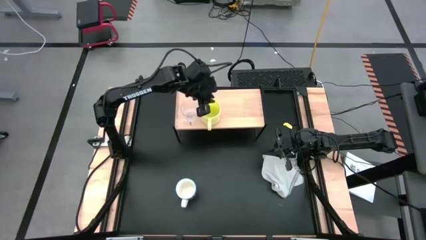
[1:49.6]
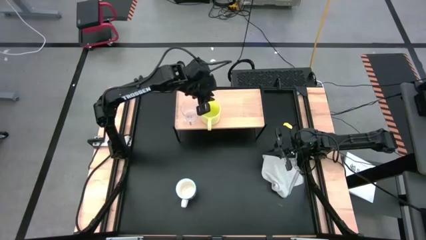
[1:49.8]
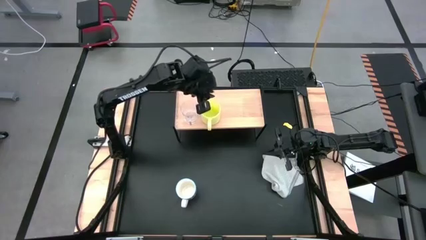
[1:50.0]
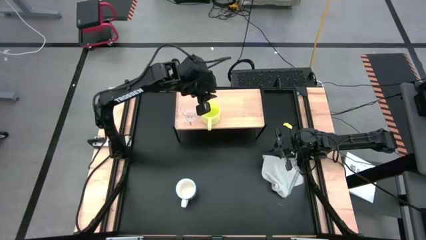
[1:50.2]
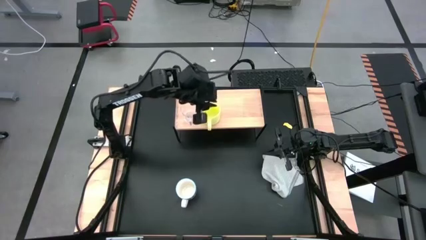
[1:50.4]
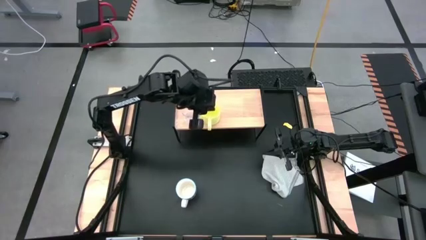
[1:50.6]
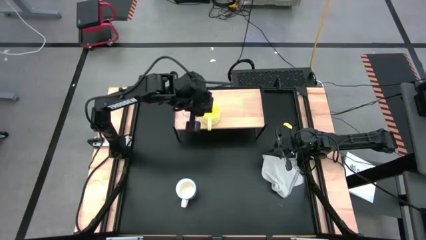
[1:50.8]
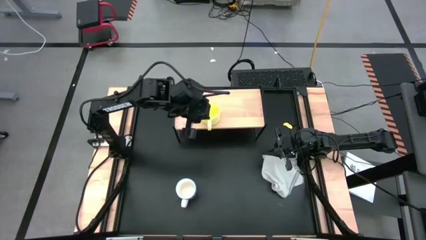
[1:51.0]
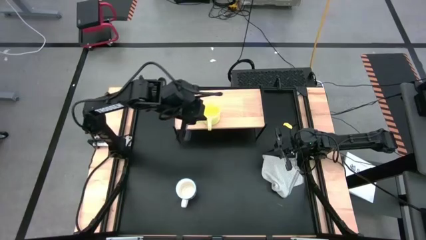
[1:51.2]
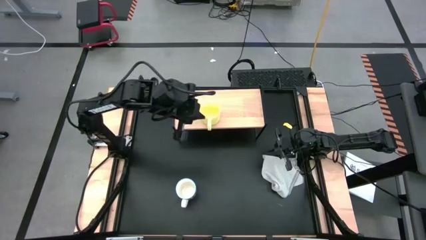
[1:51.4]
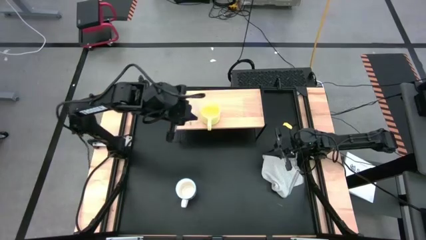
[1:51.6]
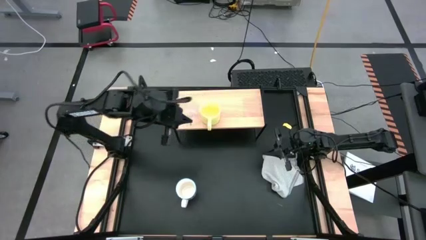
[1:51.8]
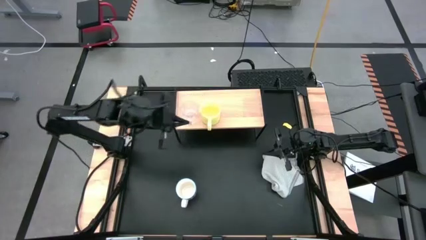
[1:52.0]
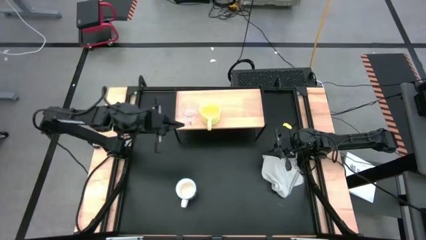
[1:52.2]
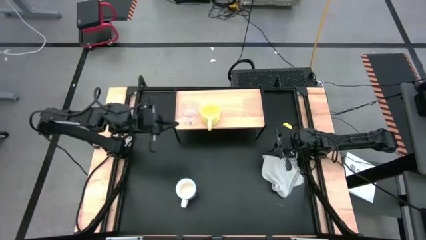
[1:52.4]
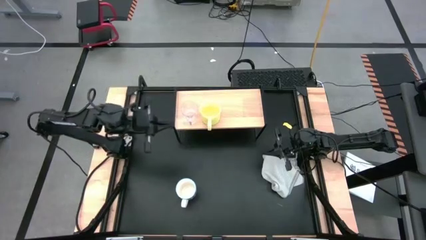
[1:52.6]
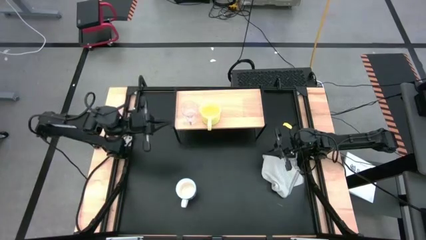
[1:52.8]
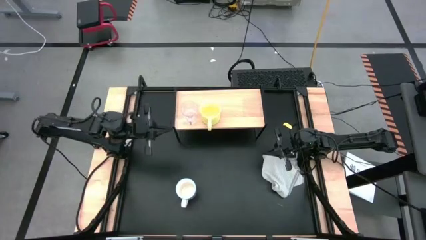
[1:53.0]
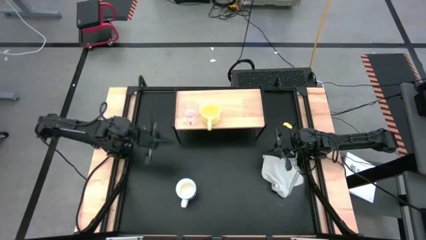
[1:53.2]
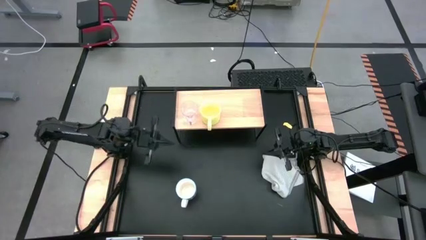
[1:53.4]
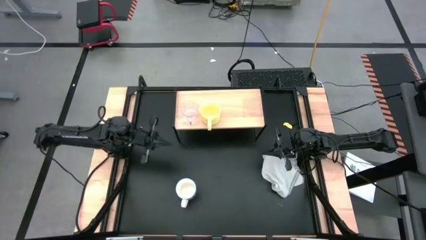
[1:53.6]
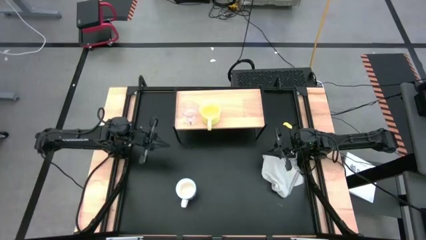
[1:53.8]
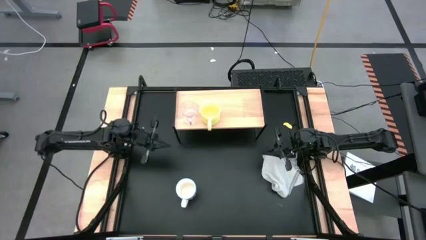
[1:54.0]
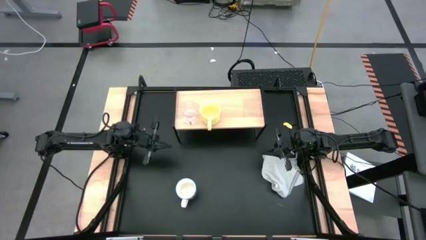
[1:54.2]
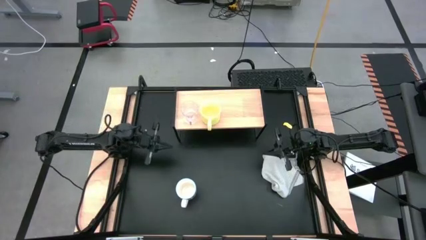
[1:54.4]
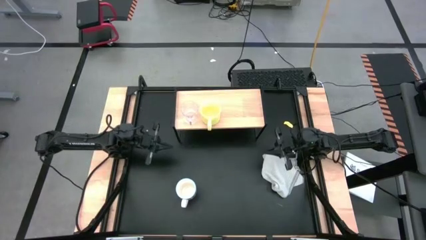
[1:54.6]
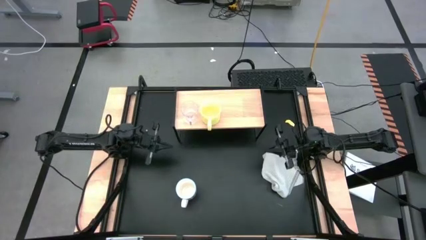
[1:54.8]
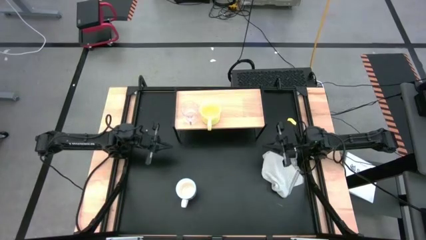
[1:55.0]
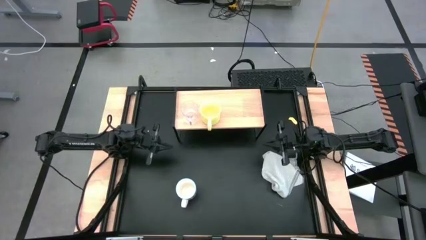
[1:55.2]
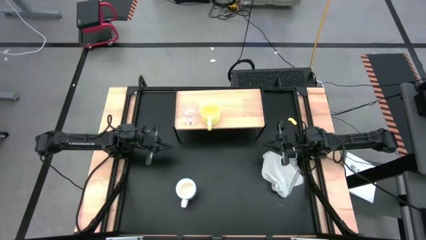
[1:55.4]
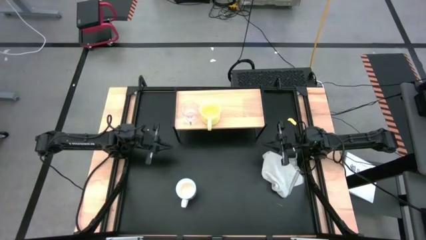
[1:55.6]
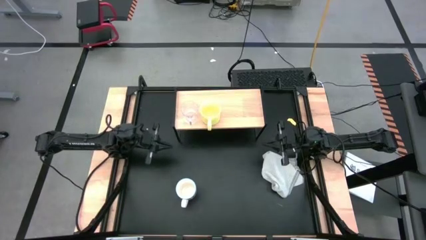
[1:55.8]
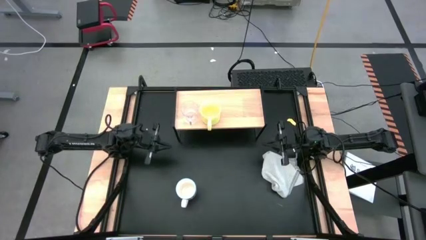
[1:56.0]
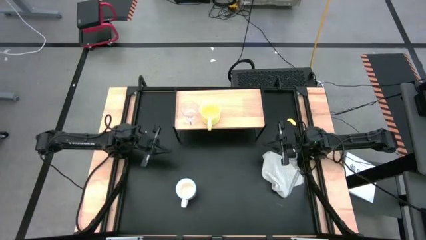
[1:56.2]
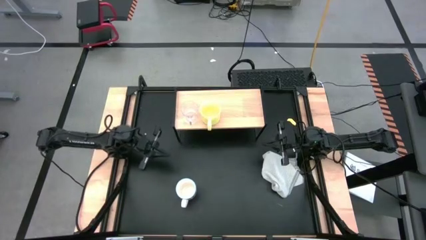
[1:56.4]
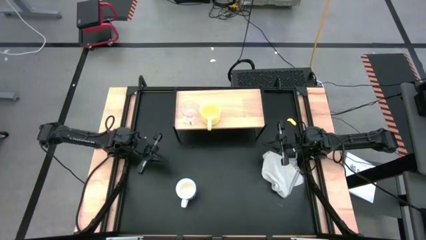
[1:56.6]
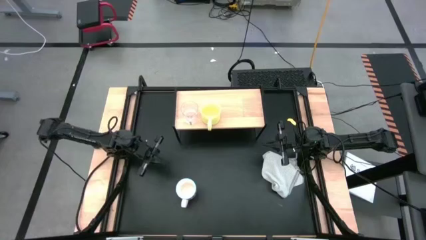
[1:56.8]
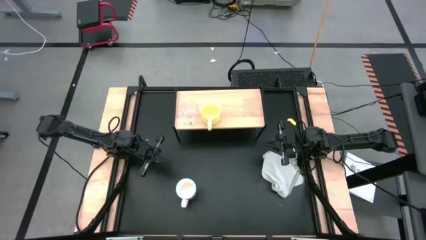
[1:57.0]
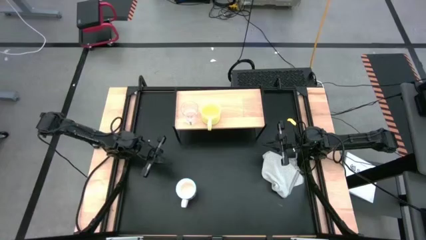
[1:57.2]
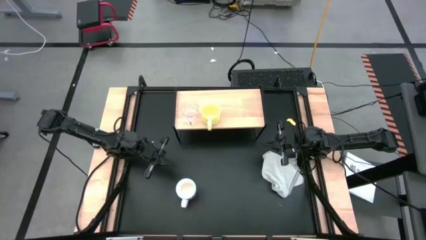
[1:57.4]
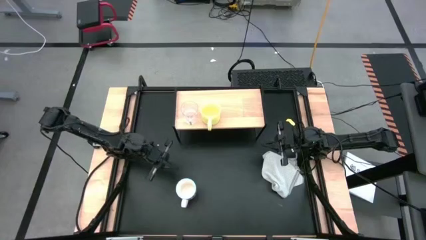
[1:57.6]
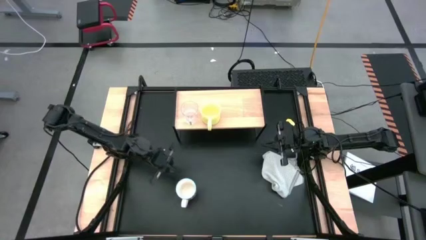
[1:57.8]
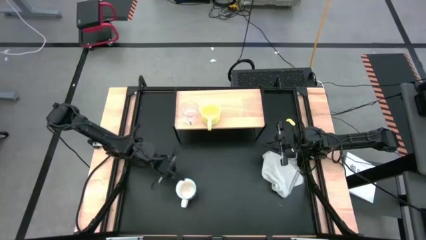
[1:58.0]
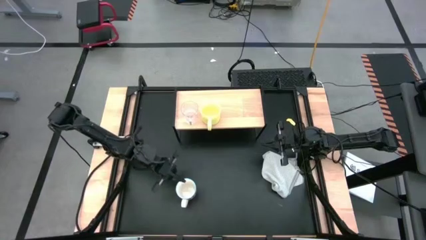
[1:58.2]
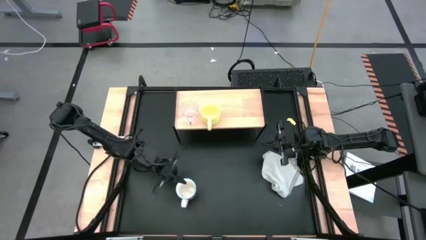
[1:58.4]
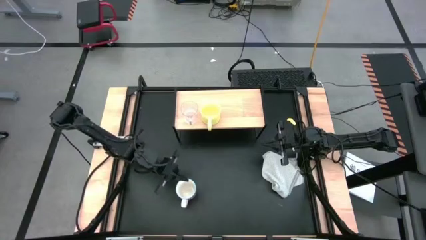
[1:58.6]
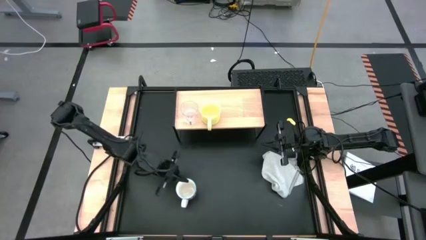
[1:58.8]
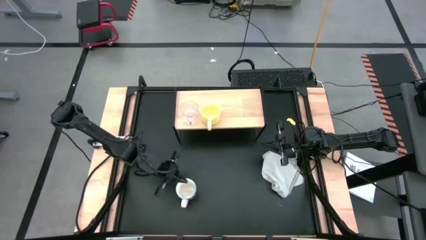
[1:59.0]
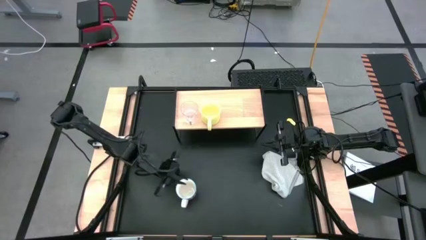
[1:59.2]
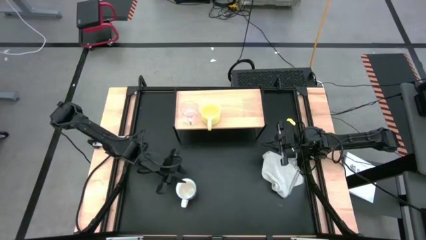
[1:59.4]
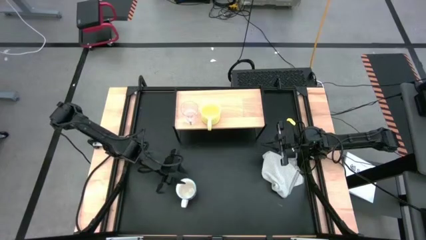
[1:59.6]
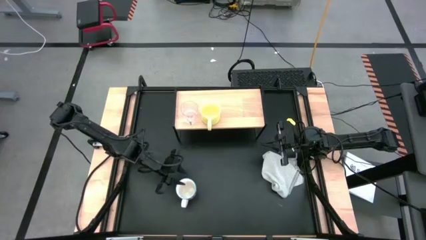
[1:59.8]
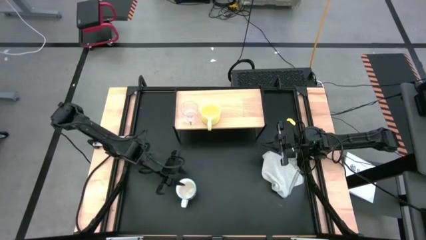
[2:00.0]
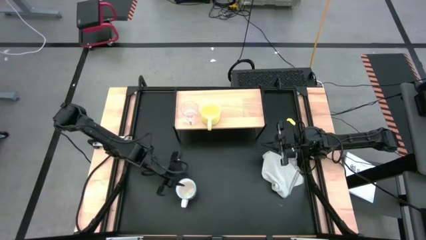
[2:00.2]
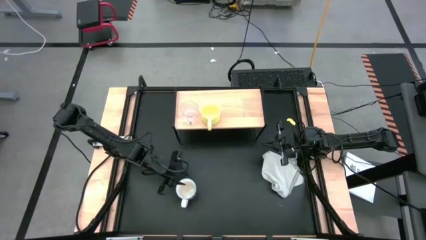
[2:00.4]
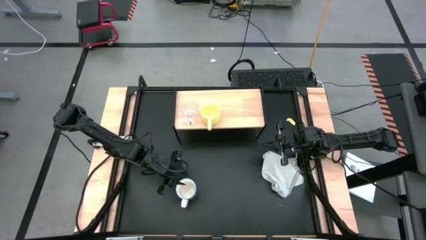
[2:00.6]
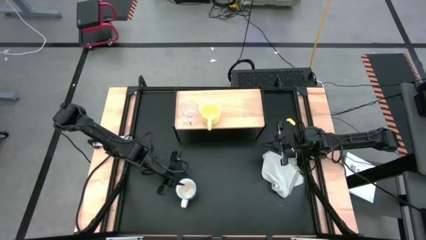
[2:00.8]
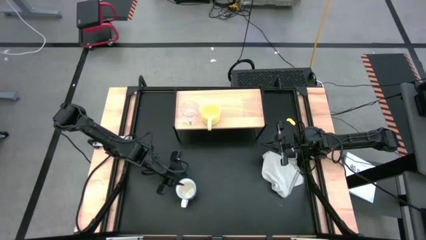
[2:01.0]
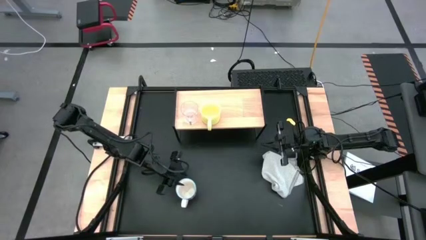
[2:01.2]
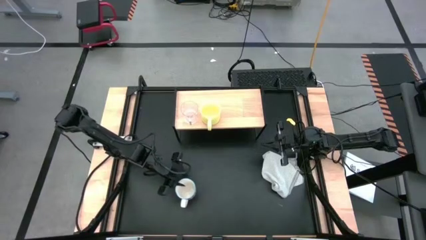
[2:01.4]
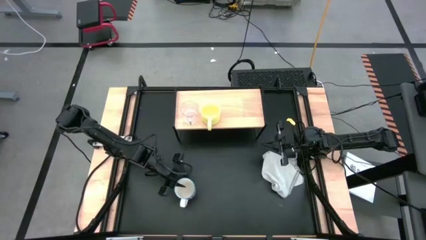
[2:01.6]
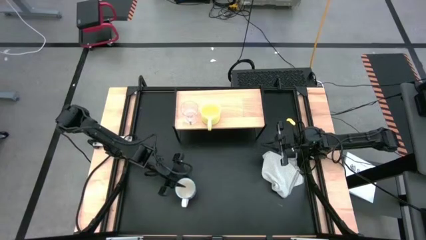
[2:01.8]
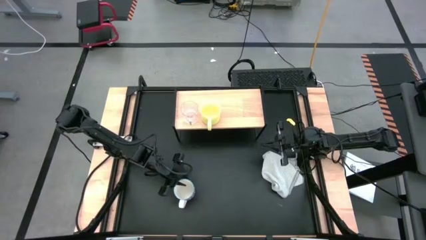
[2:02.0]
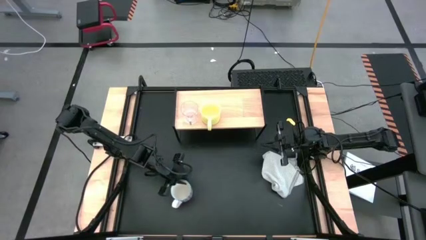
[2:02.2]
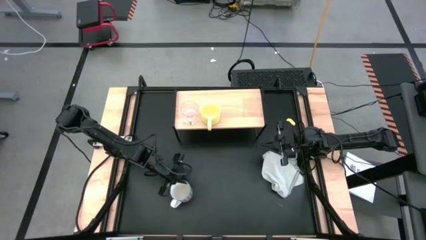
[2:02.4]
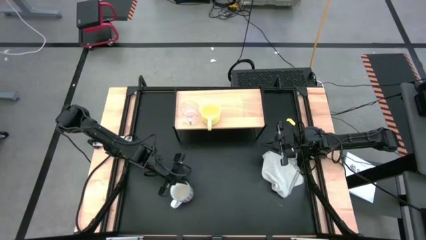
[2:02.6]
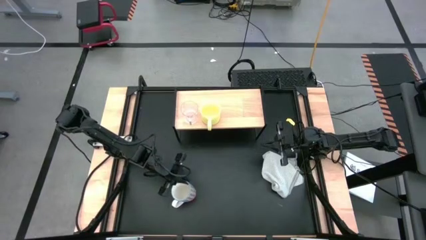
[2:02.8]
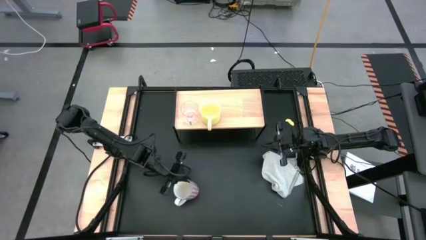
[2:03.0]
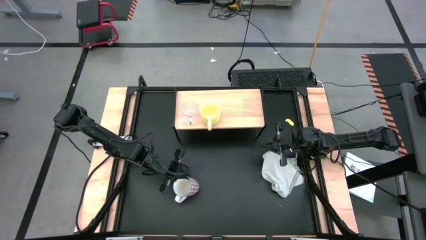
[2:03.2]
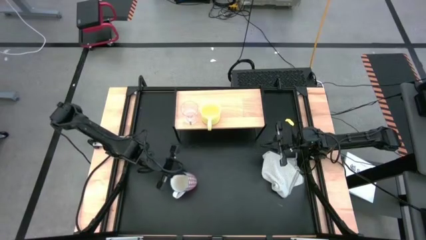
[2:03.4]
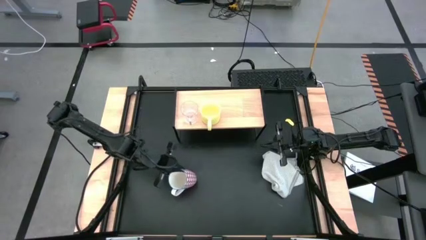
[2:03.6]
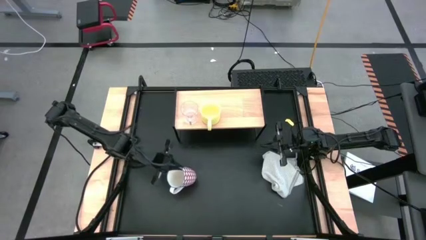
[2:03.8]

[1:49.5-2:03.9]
Task: Stack small to large cups/mugs on shelf
Put the red patterned mug on the shelf

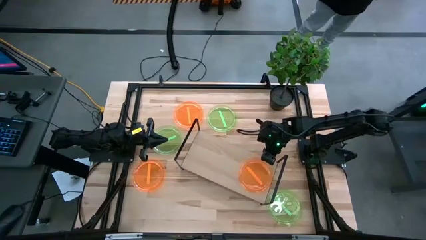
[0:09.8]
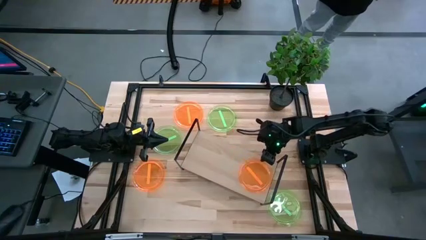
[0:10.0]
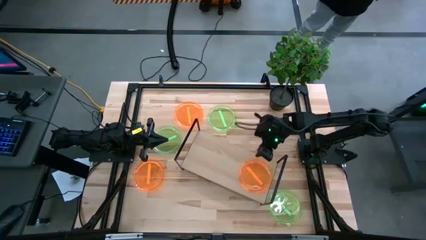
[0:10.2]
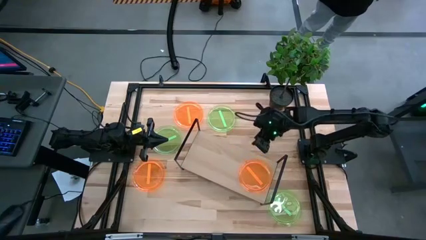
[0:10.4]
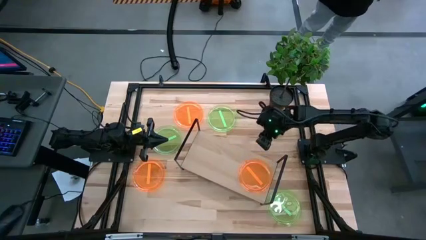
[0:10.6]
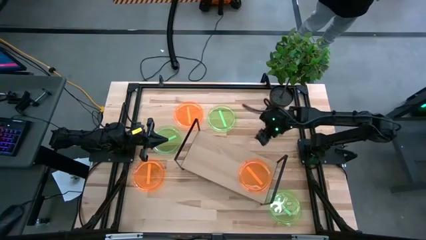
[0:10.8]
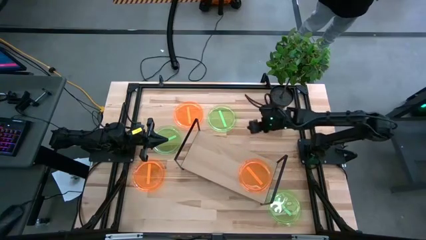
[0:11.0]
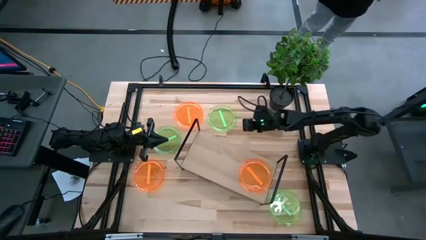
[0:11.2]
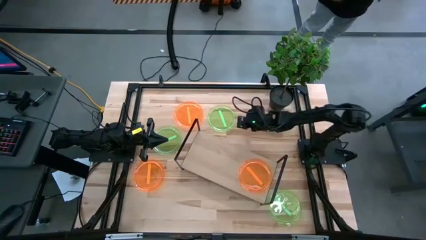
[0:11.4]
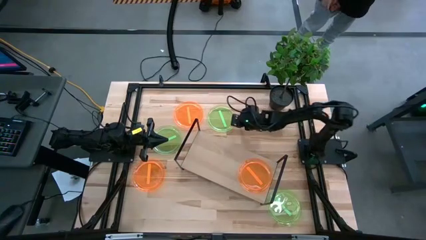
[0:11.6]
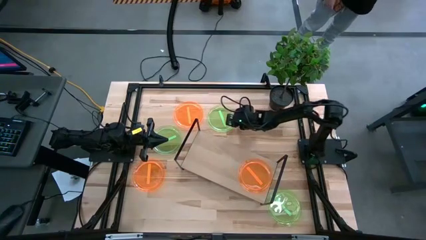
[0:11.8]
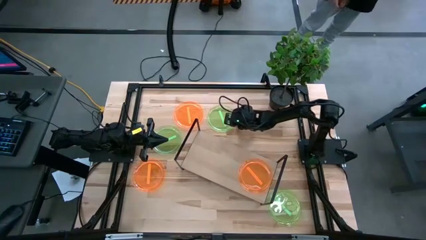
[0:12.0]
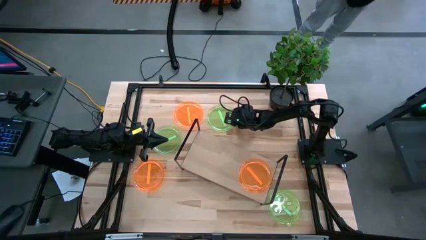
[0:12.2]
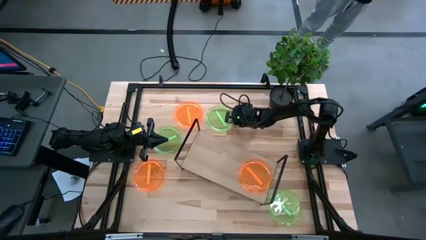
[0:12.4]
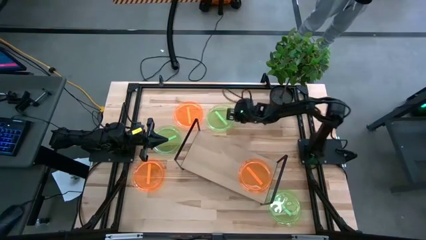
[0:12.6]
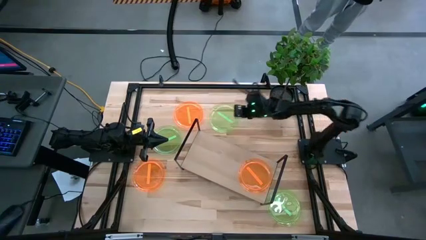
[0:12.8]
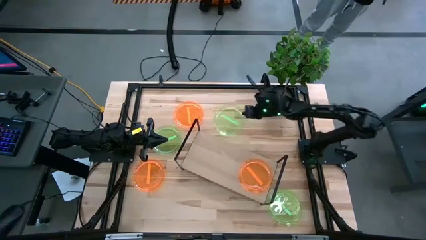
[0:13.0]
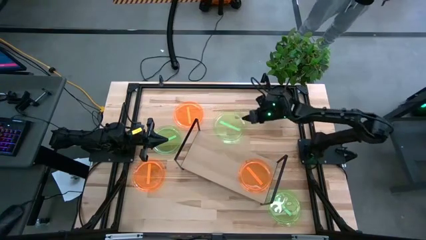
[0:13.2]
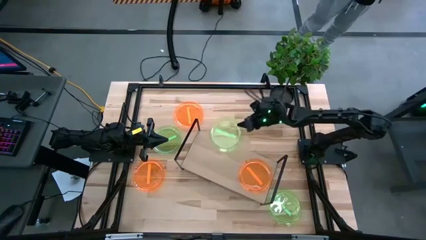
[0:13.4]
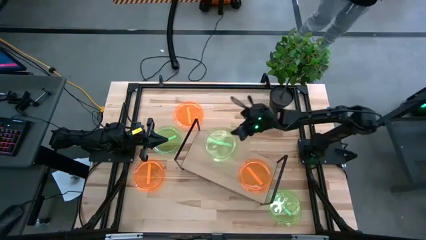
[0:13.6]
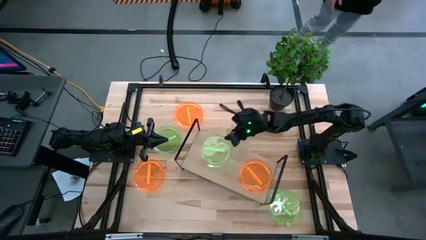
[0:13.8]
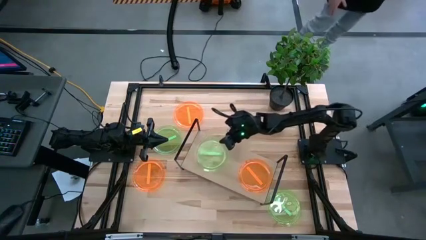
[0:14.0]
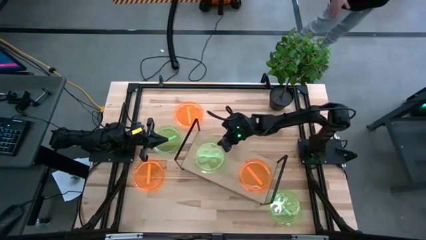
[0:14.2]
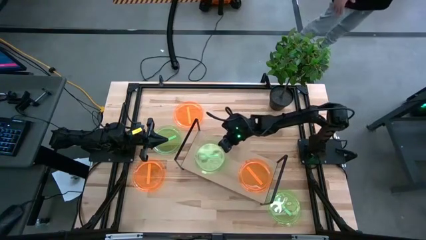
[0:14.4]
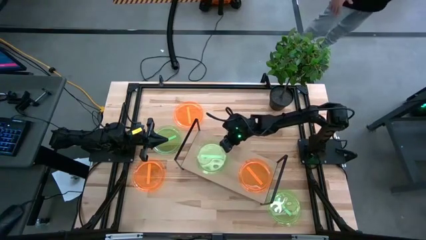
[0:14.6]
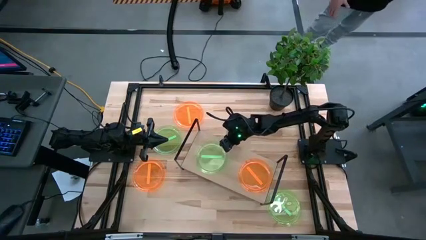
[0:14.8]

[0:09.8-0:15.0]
Task: Place and stack plates onto a shelf
Put the top right green plate into the shelf
